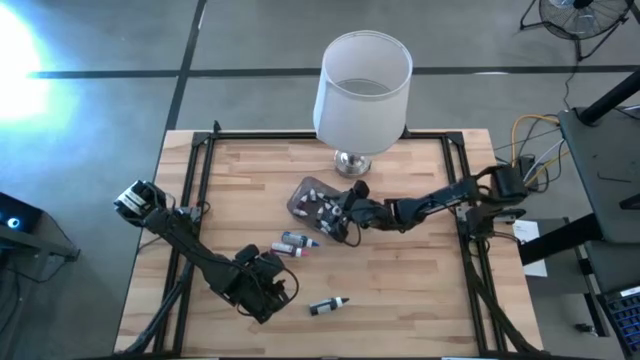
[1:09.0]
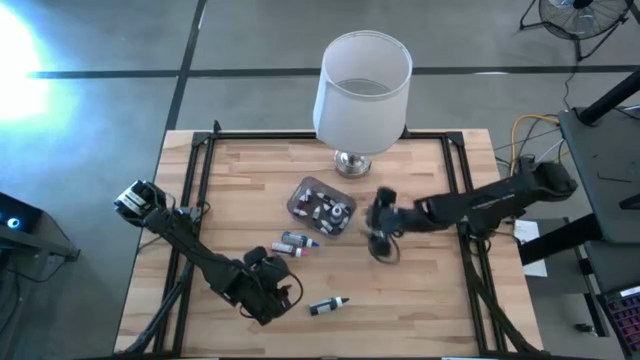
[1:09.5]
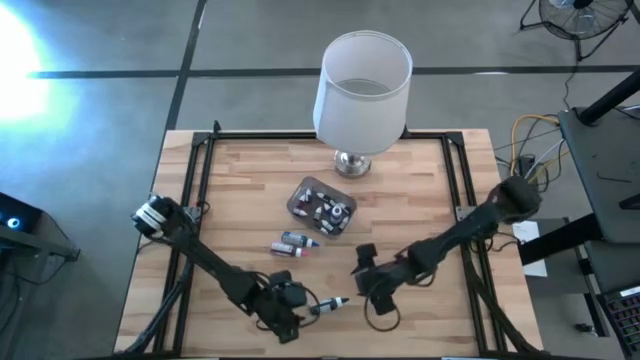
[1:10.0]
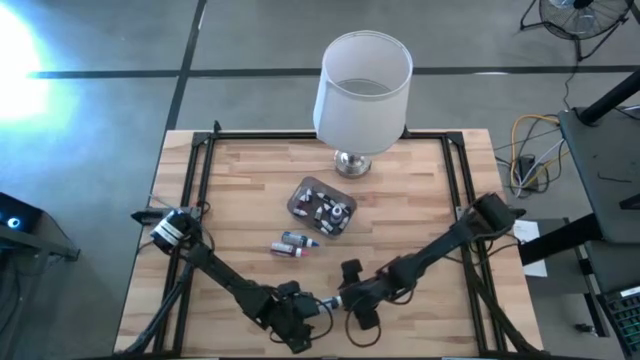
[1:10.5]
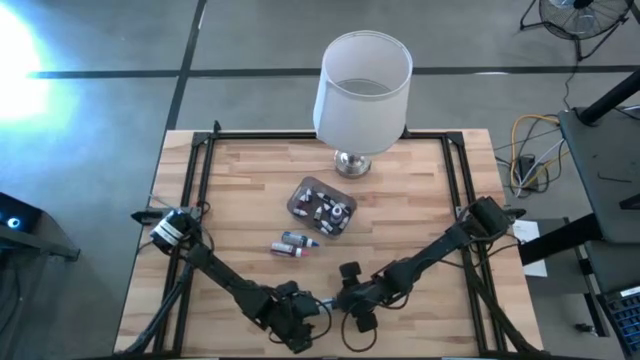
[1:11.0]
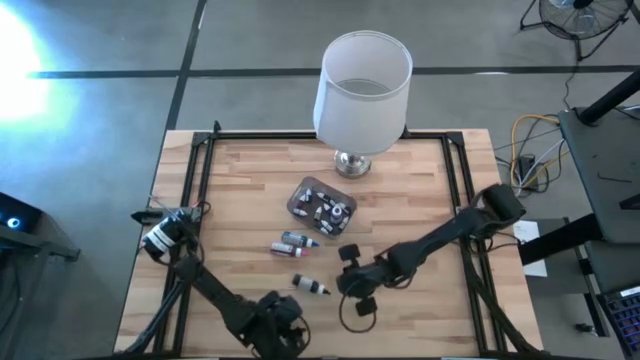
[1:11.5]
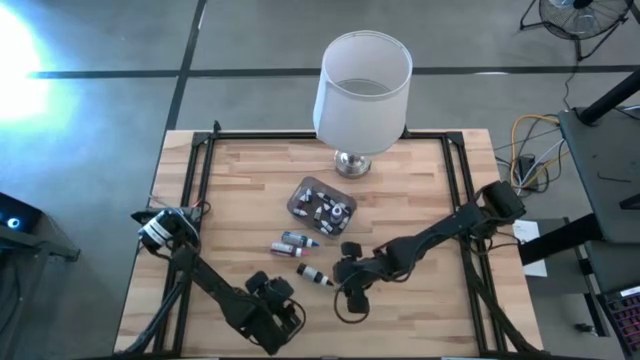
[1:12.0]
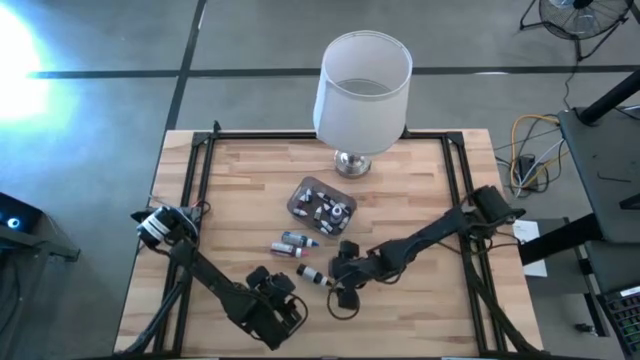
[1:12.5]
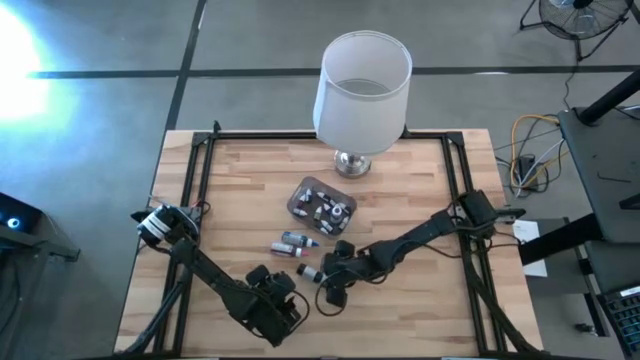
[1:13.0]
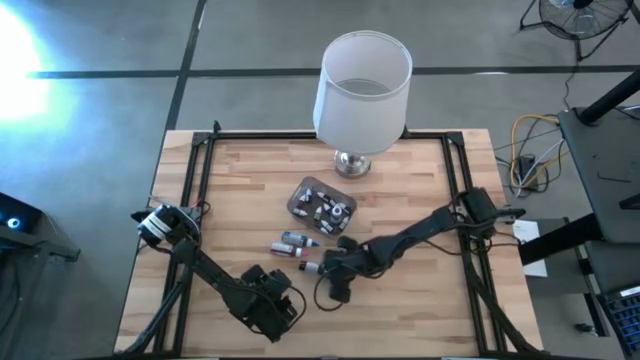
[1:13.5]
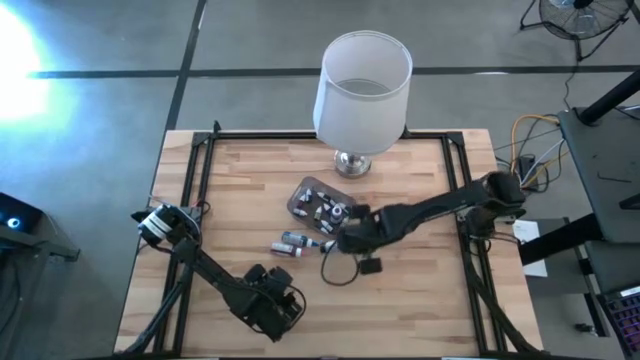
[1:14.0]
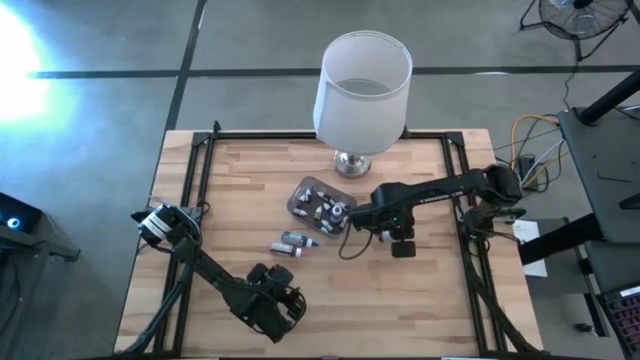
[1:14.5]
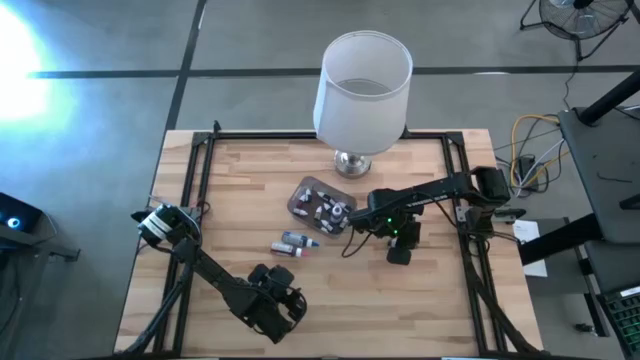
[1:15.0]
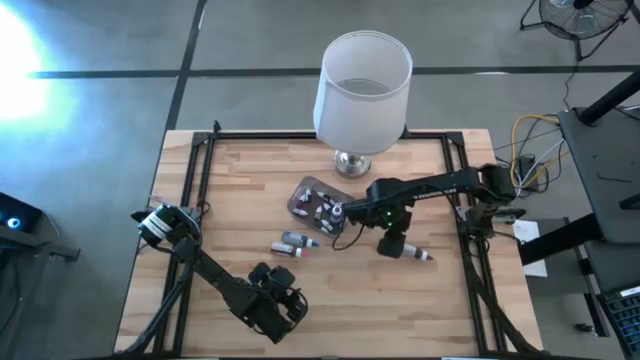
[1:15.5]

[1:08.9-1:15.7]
Task: Pick & Place food coloring
Put the large black food coloring into the black bin

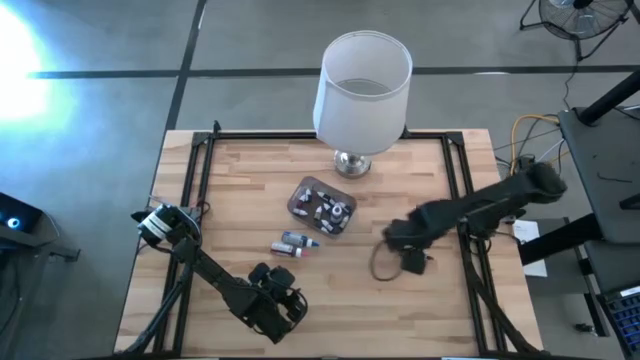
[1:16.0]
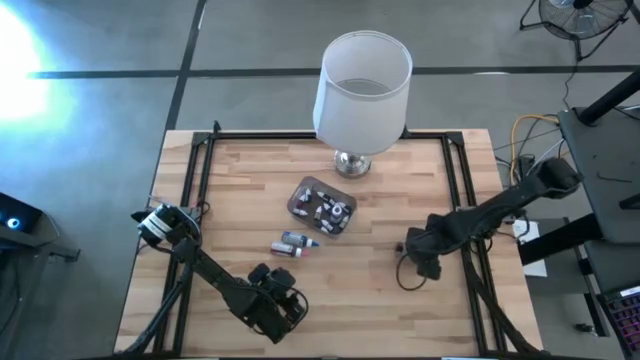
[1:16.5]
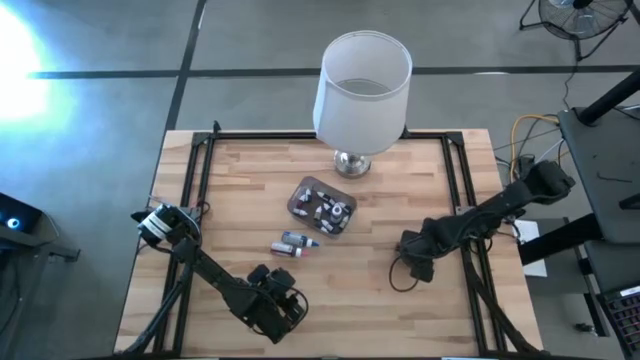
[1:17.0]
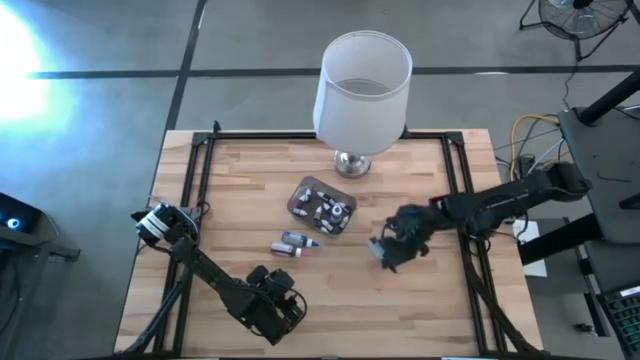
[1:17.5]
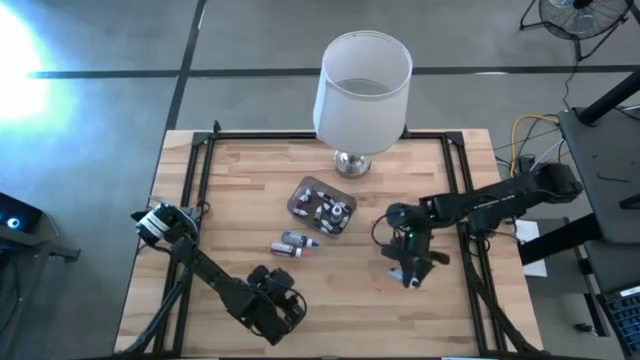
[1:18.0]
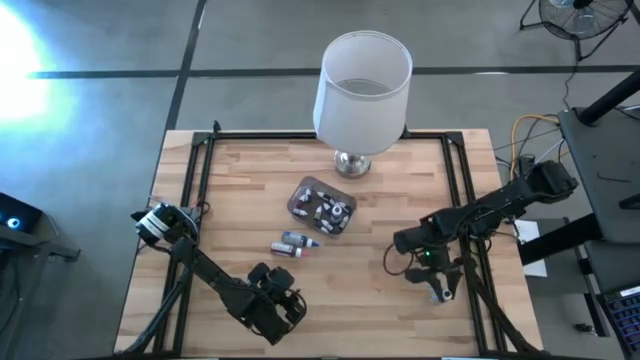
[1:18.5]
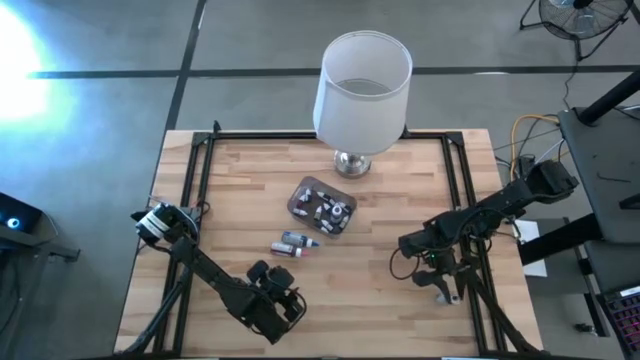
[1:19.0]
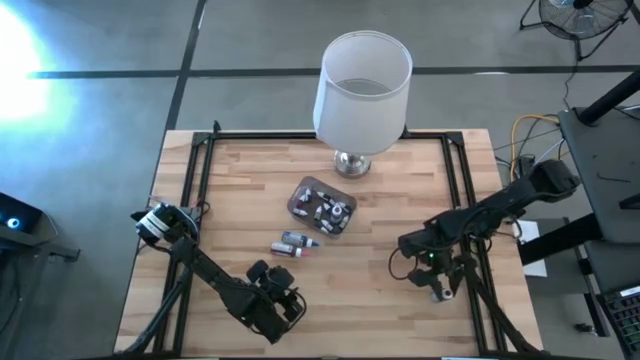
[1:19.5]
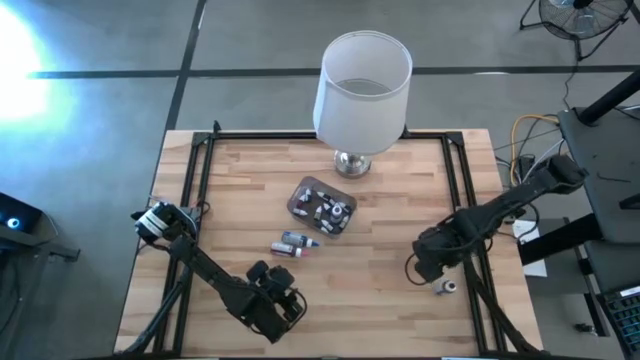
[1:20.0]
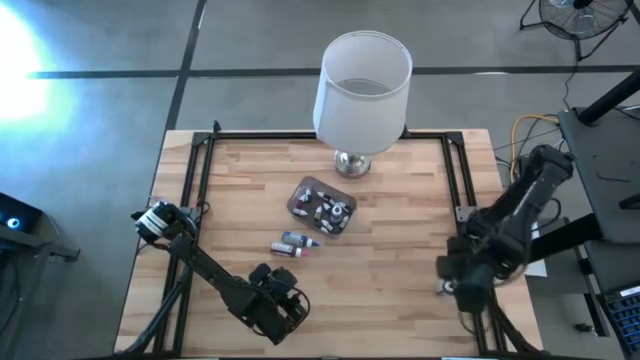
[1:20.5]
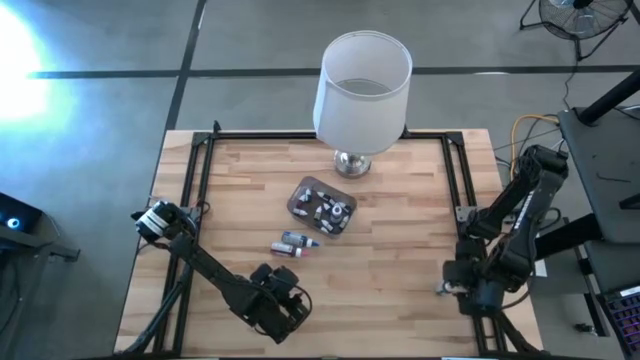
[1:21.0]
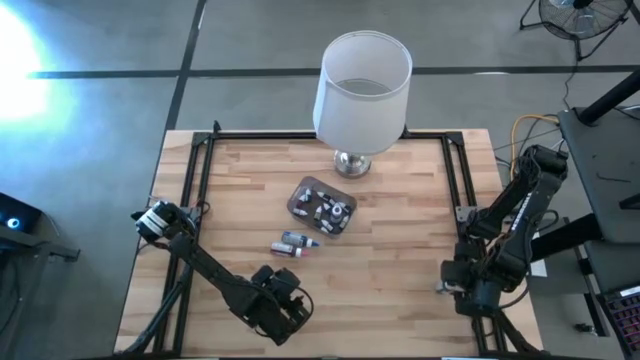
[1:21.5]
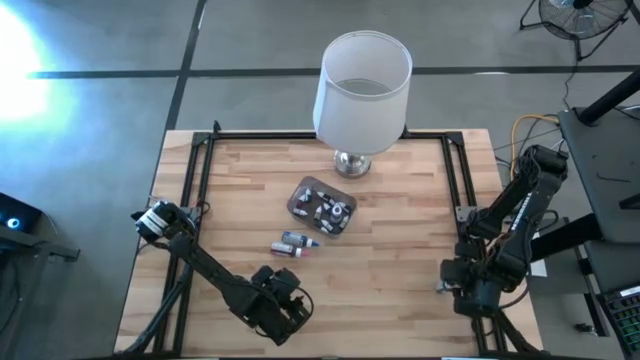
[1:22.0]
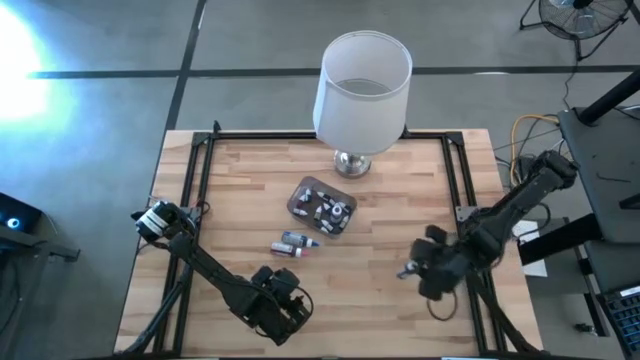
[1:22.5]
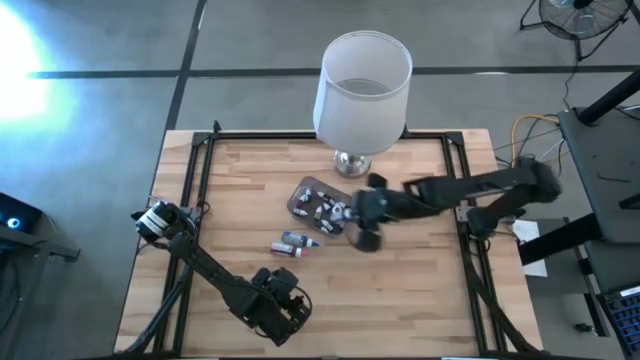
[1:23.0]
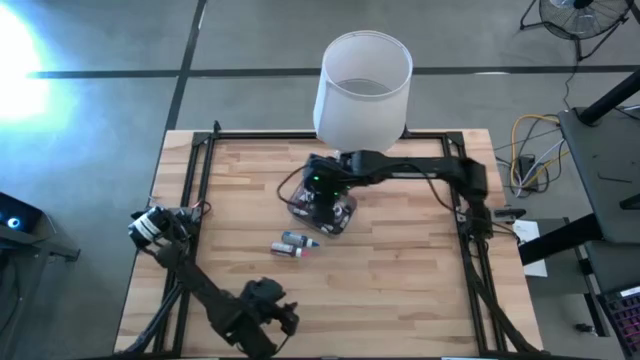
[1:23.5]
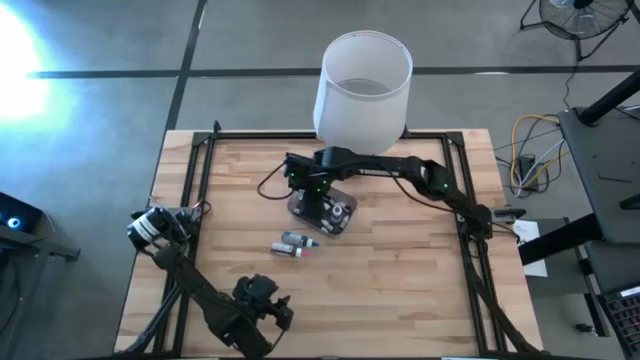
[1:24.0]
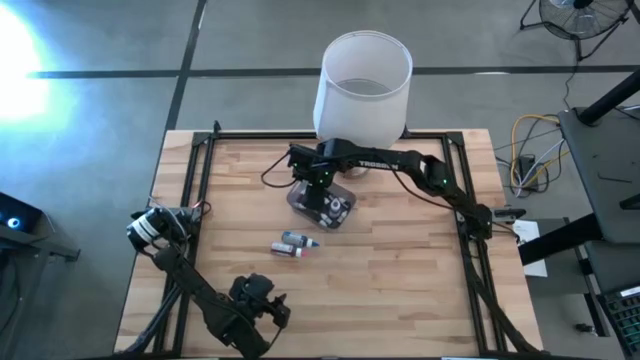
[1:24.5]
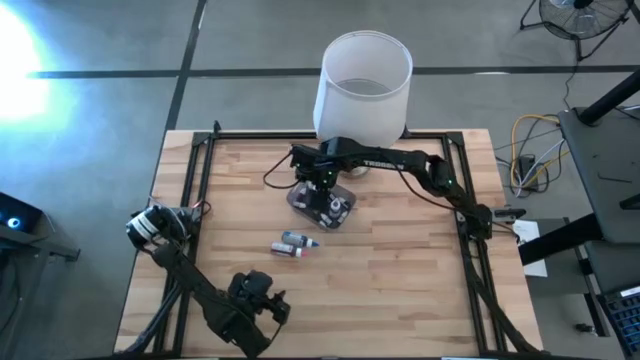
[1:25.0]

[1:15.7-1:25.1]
Put the large black food coloring into the black bin

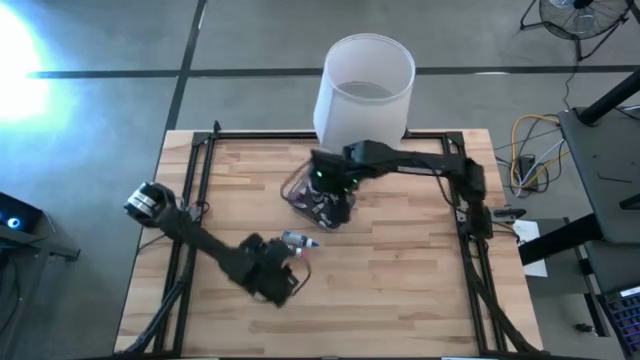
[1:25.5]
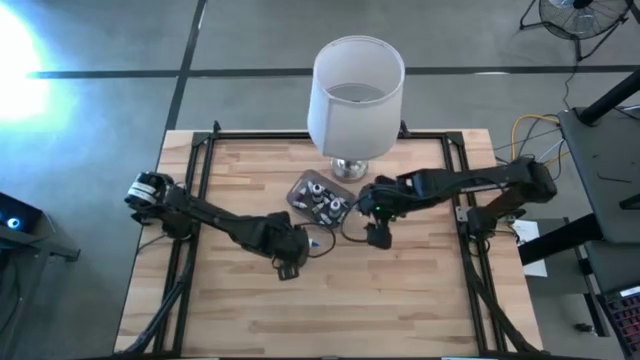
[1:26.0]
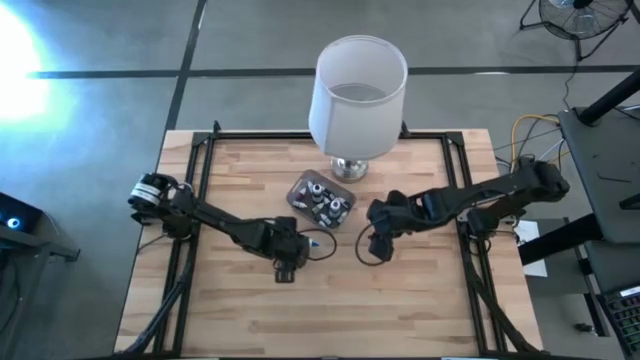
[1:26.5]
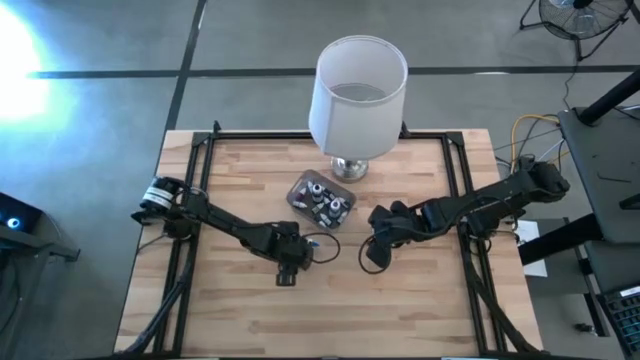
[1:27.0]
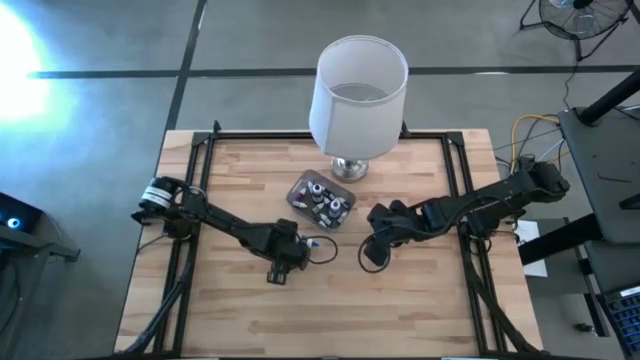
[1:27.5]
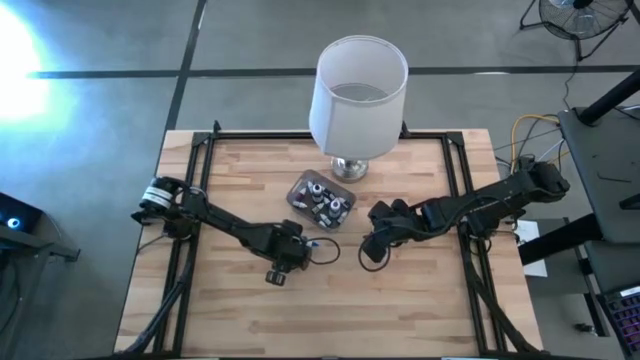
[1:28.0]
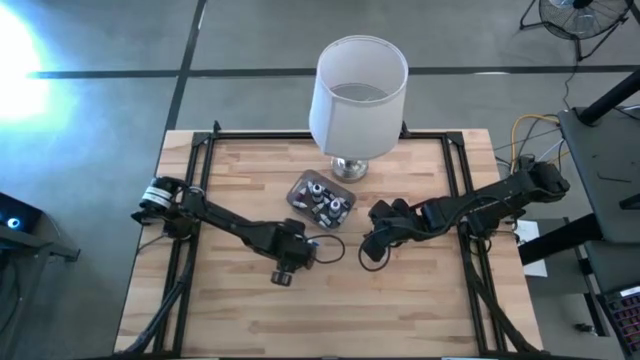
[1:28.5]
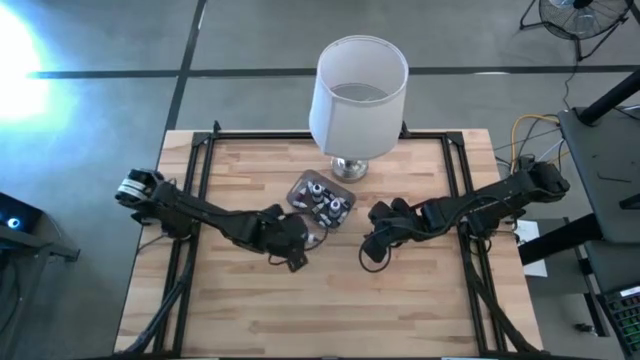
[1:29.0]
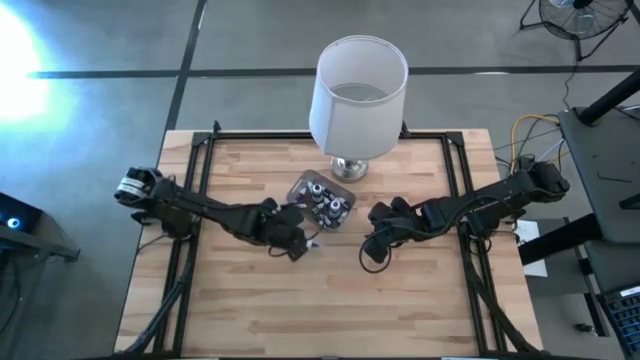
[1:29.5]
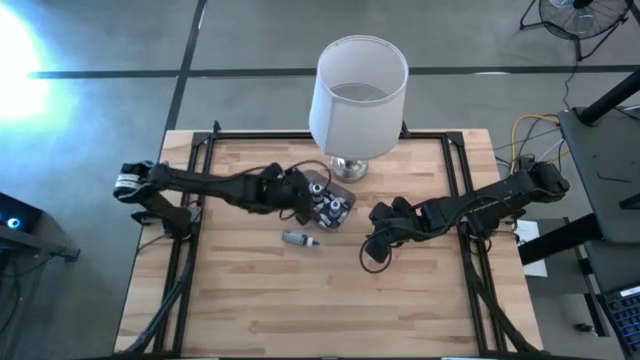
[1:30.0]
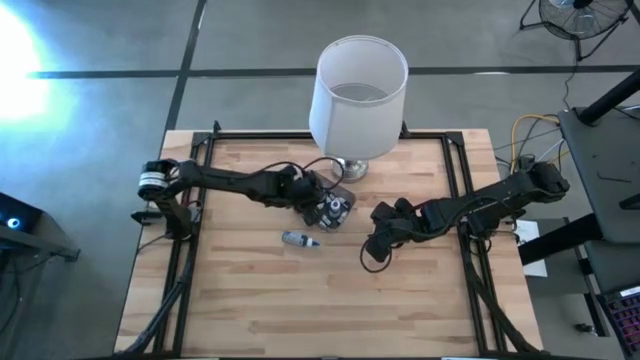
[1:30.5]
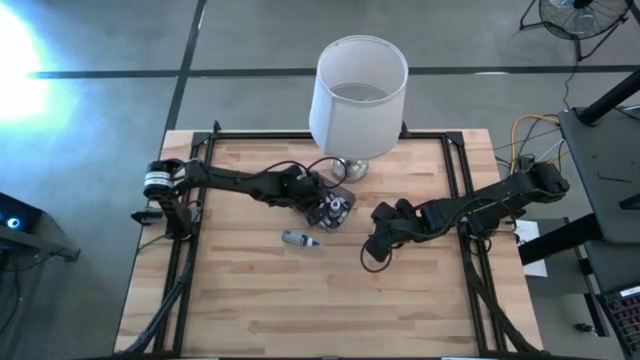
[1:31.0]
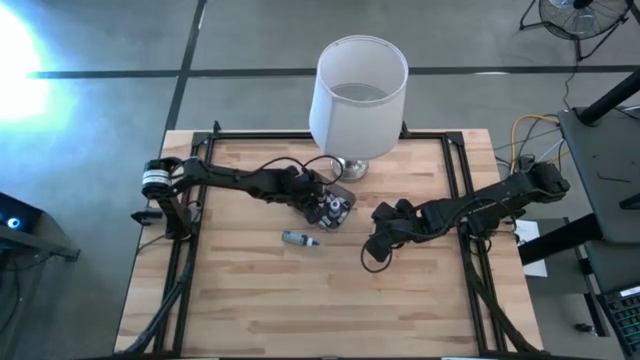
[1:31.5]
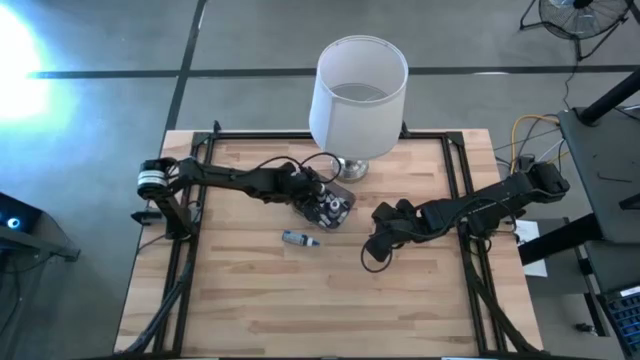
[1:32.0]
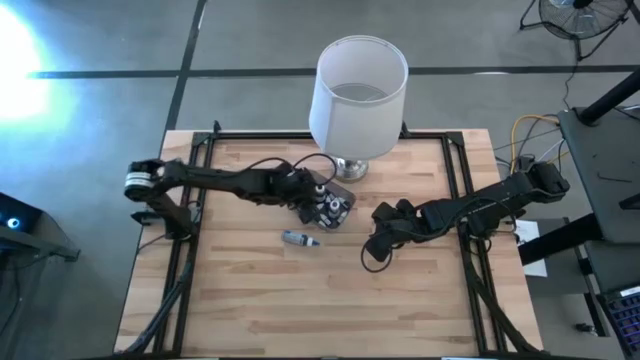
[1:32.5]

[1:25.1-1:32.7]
Put the large pink food coloring into the black bin
